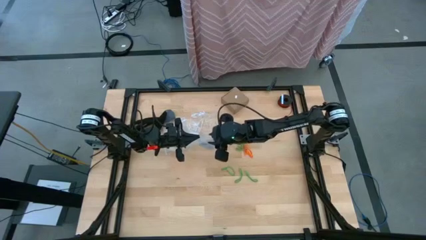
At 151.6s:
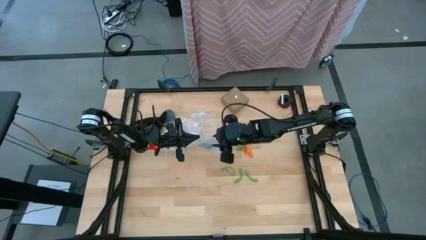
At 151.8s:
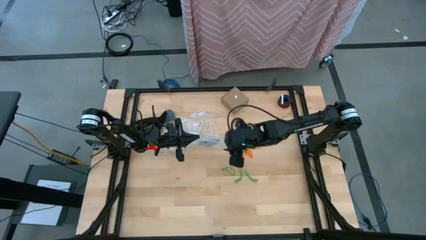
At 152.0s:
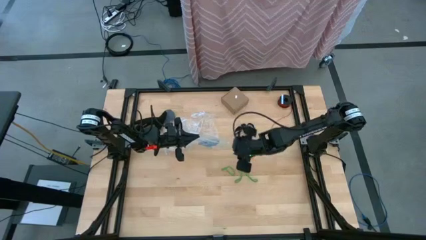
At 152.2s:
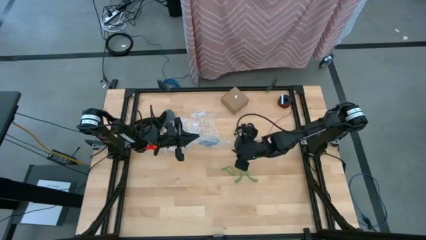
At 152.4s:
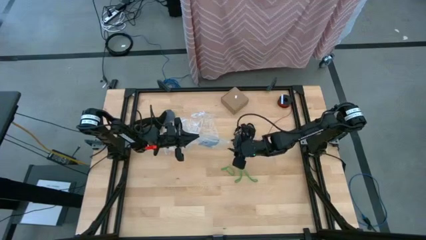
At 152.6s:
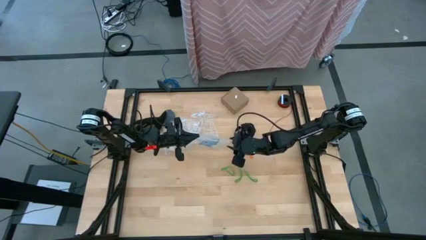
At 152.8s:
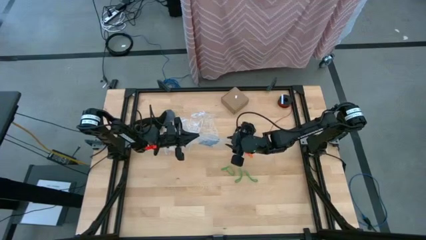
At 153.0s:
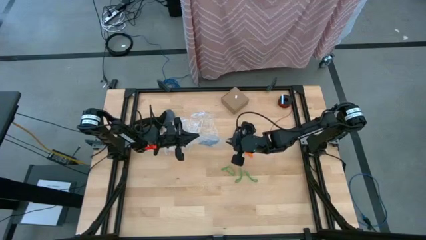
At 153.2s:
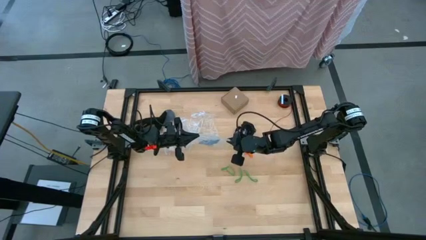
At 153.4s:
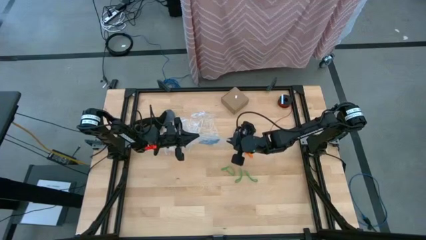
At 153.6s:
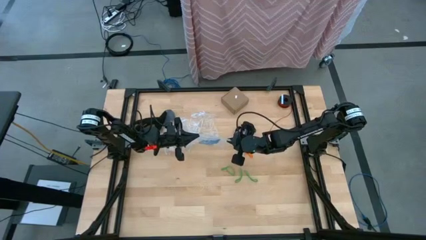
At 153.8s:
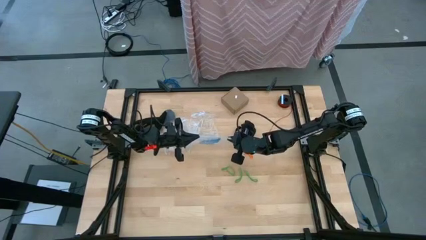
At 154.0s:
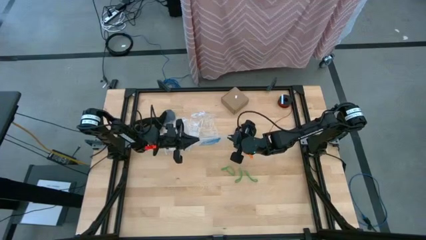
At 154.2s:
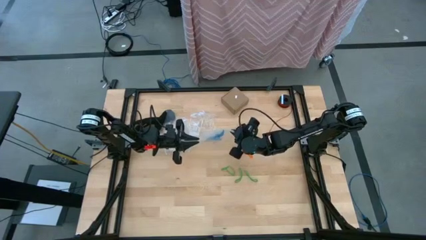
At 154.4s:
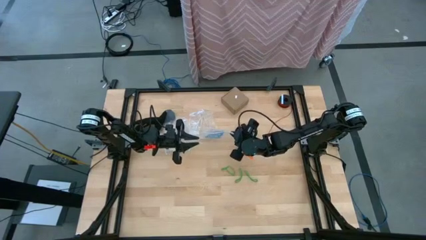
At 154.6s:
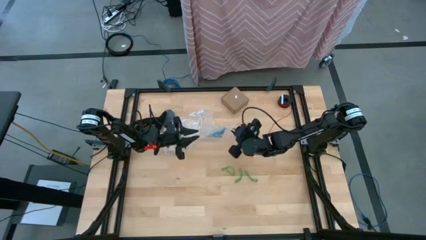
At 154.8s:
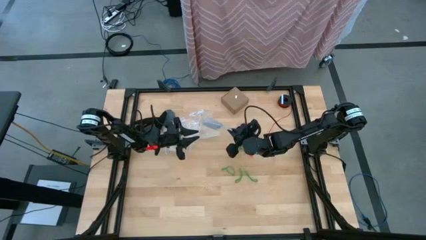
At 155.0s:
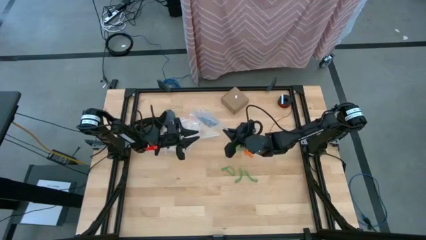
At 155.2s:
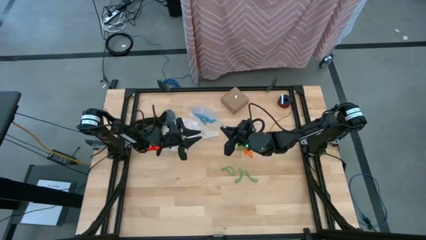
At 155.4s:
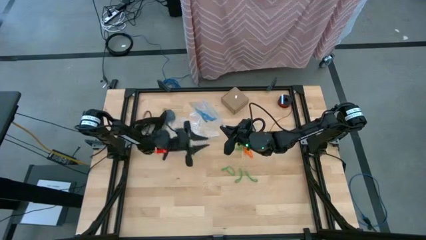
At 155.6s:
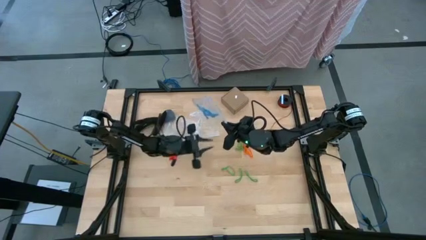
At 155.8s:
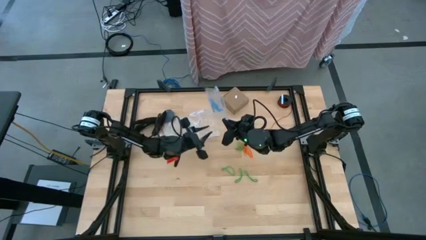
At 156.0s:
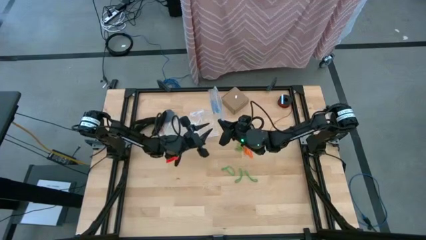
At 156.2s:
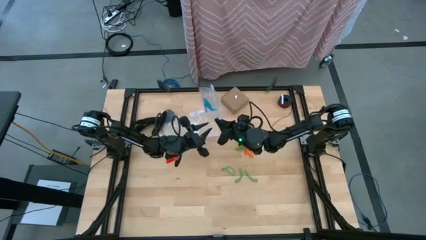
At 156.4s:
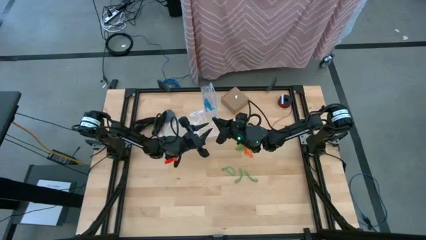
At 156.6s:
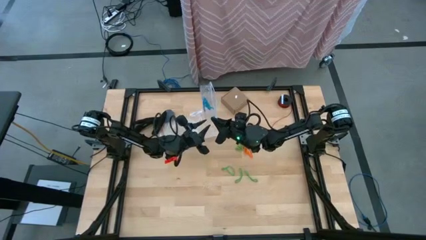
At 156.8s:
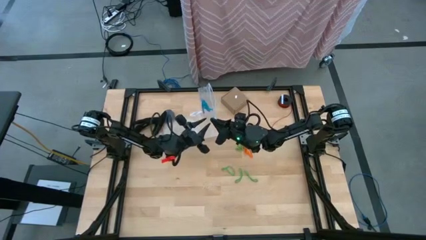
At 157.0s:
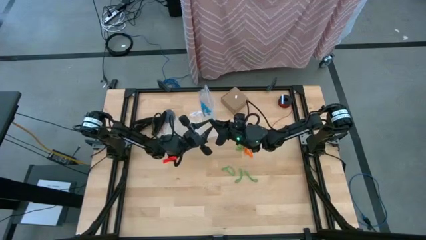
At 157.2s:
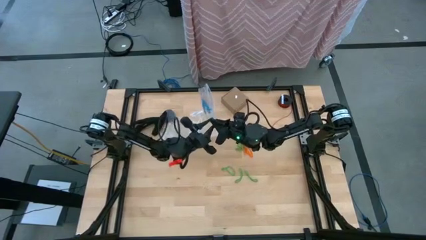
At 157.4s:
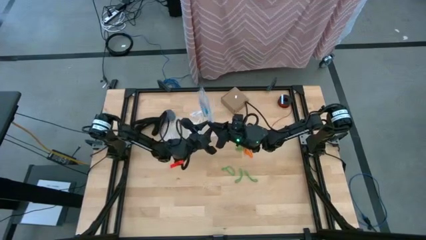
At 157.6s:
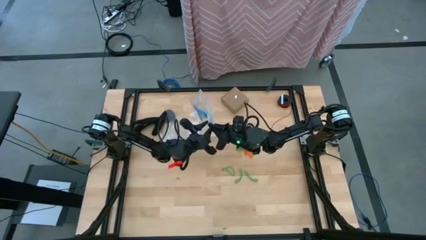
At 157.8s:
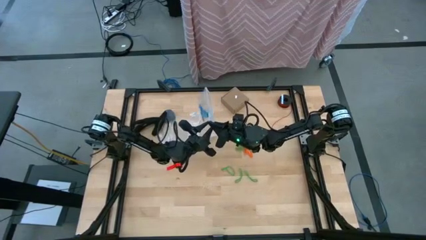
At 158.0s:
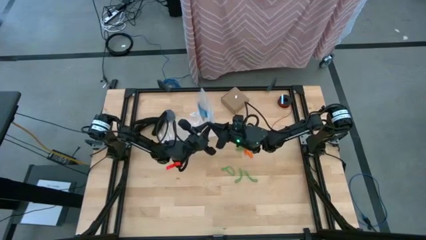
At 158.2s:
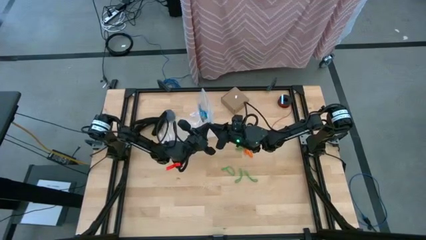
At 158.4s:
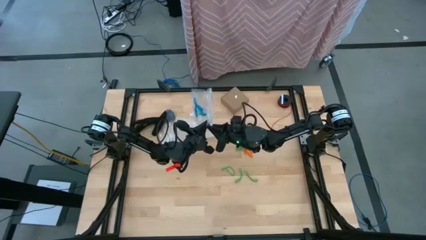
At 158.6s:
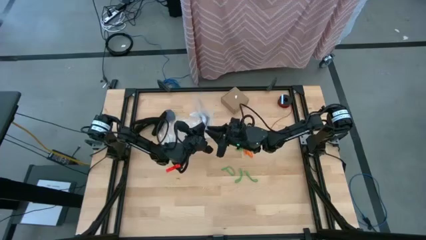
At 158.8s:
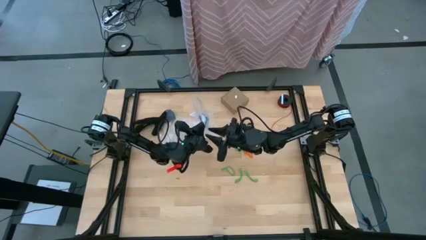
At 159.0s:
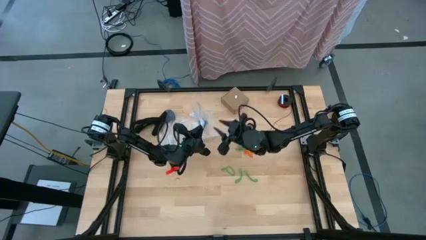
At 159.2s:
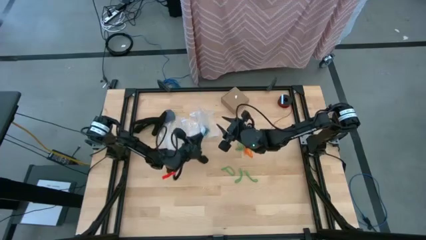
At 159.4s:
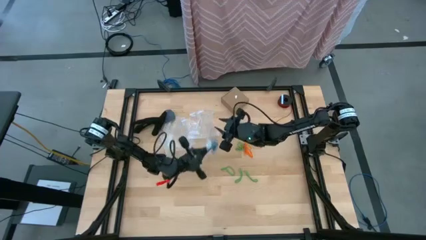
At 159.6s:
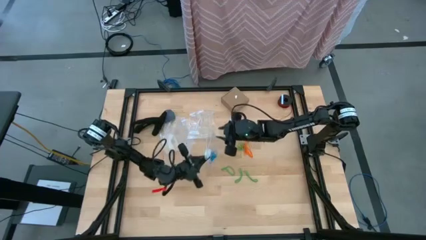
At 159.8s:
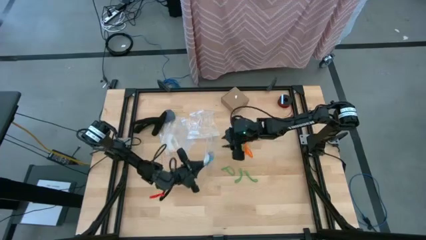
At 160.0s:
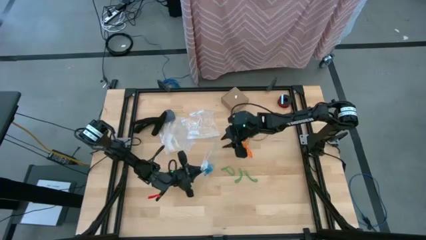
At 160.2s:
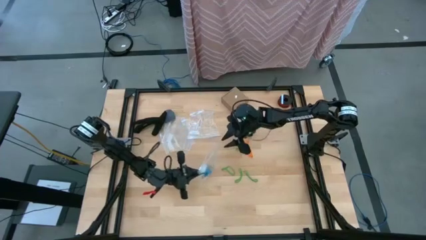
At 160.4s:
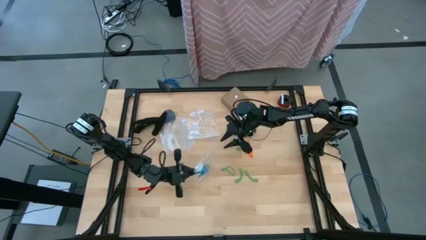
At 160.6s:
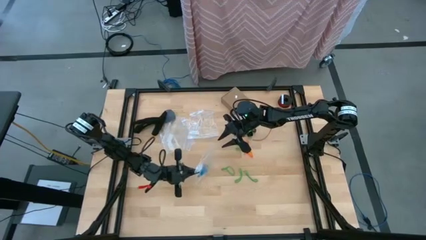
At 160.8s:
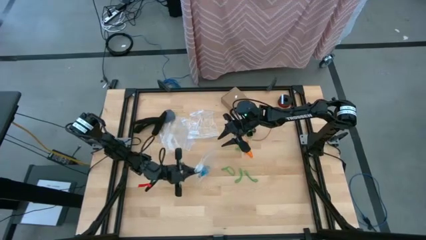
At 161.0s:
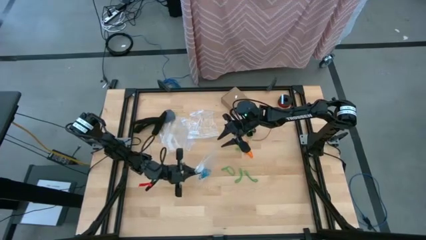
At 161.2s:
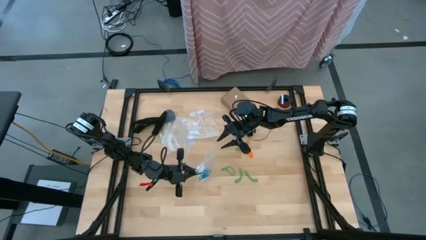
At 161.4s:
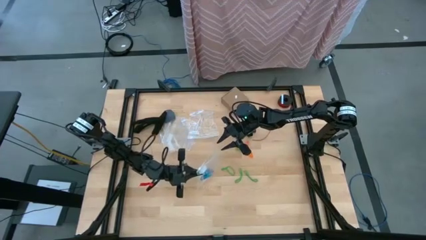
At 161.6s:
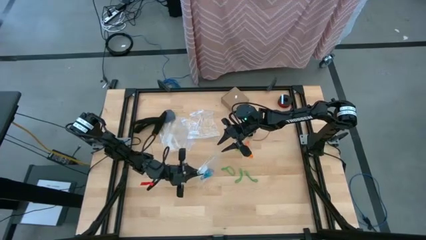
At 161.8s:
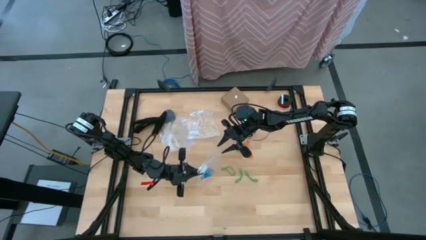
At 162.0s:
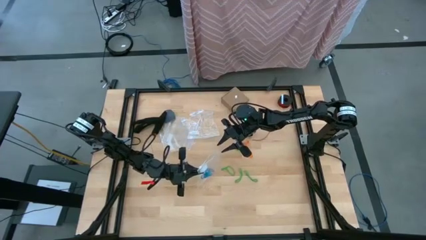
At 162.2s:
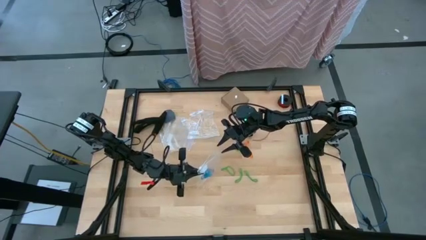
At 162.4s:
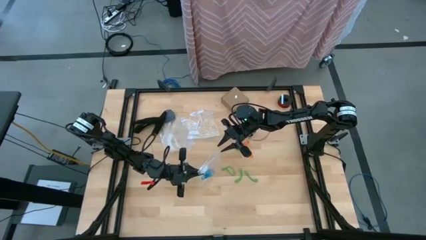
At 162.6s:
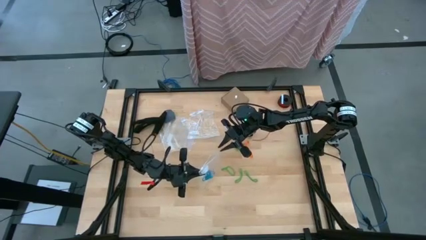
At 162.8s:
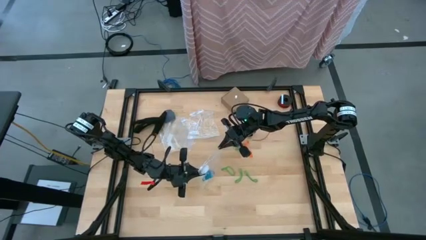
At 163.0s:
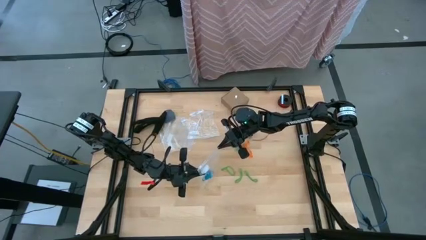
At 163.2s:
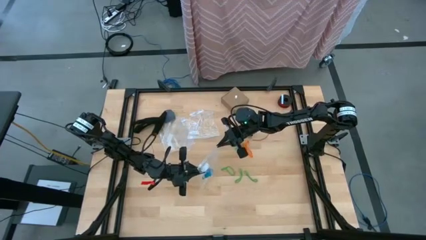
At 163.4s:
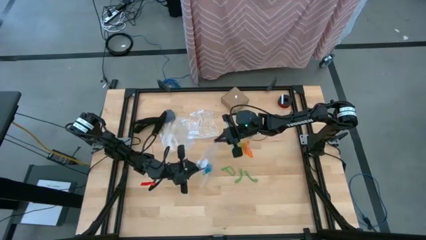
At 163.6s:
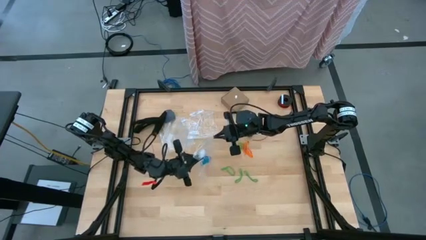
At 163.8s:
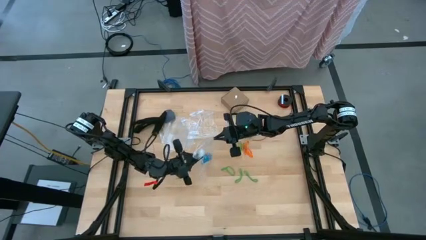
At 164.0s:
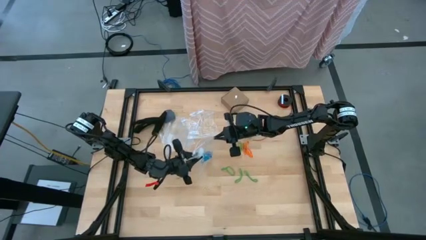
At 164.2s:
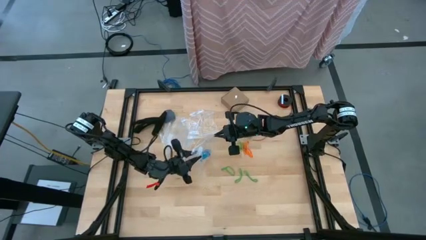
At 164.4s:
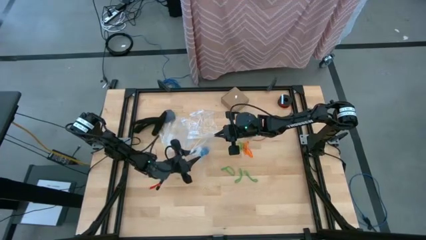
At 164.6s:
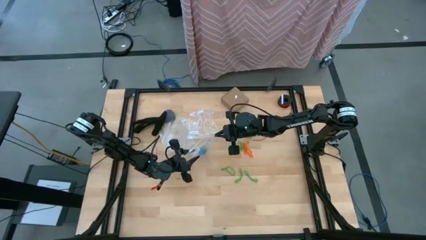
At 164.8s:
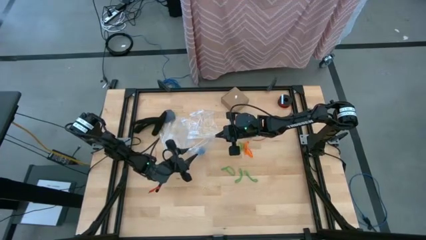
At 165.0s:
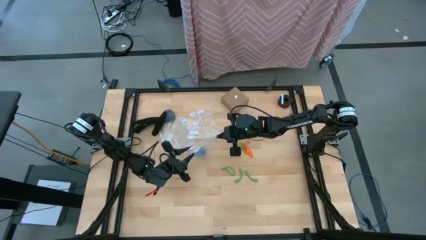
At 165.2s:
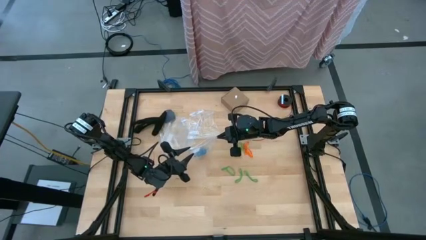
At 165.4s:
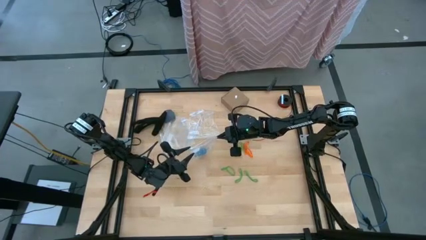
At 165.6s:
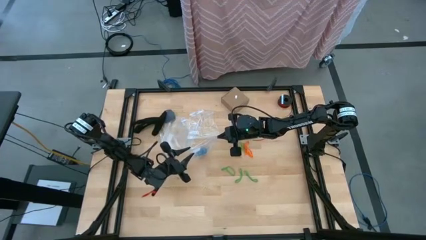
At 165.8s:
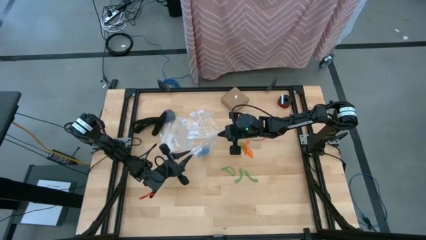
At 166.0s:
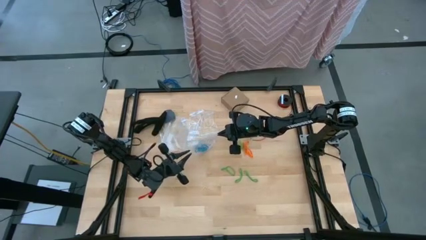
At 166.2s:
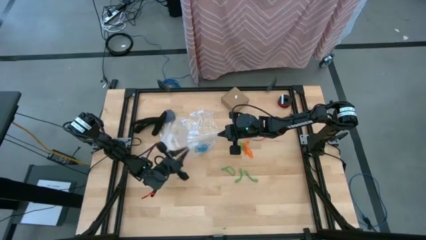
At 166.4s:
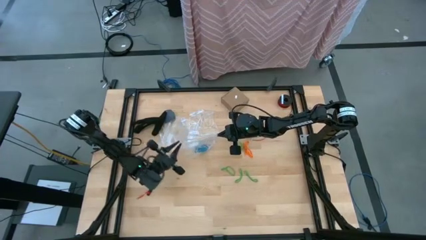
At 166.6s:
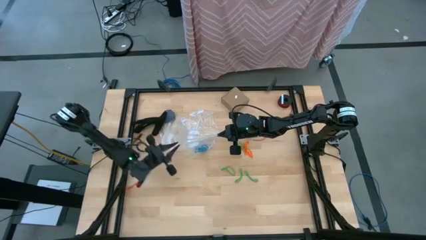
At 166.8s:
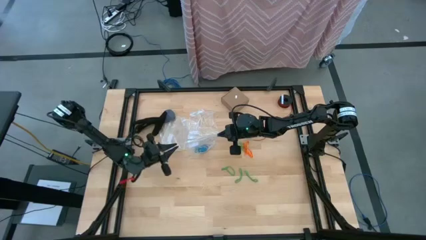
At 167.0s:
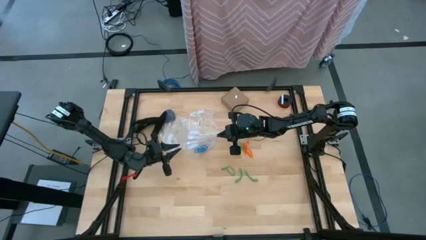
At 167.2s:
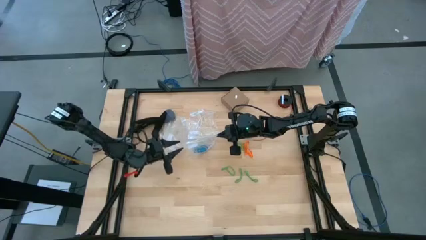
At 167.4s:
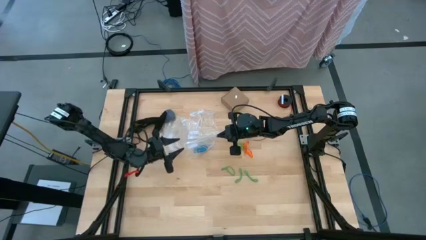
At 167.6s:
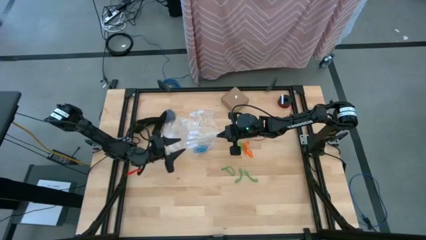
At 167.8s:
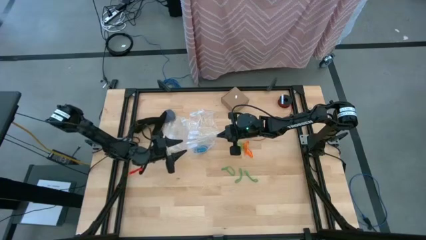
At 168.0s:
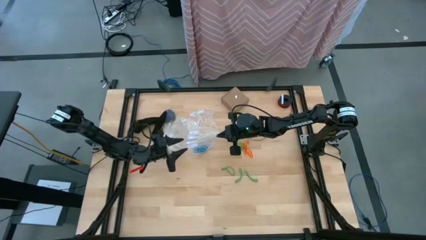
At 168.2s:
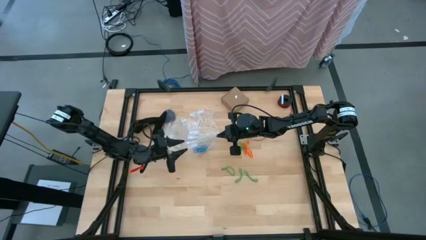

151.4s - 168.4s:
Task: Sort rubber bands
Close the transparent zip bag
